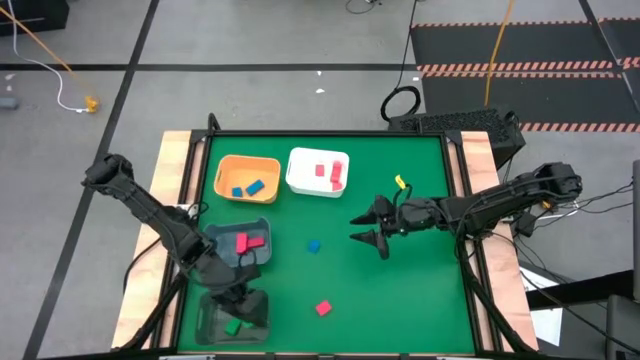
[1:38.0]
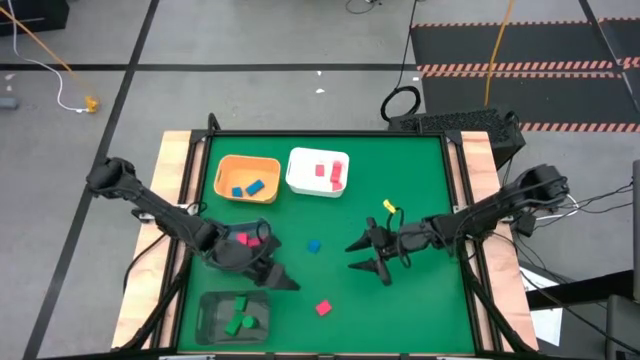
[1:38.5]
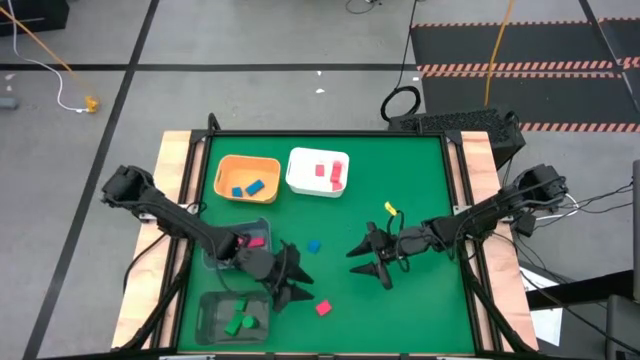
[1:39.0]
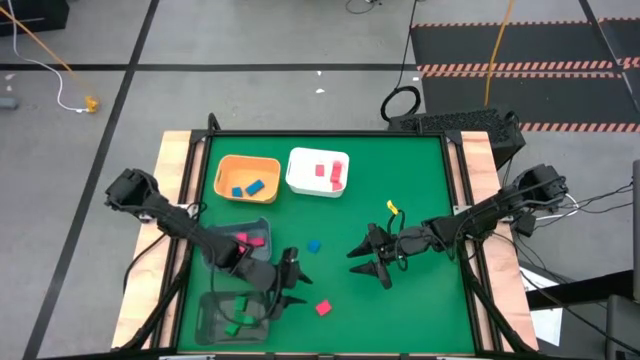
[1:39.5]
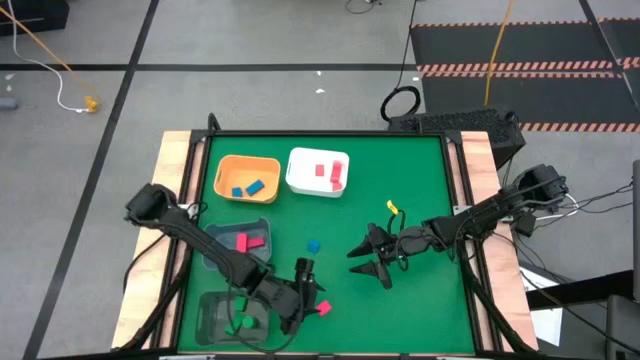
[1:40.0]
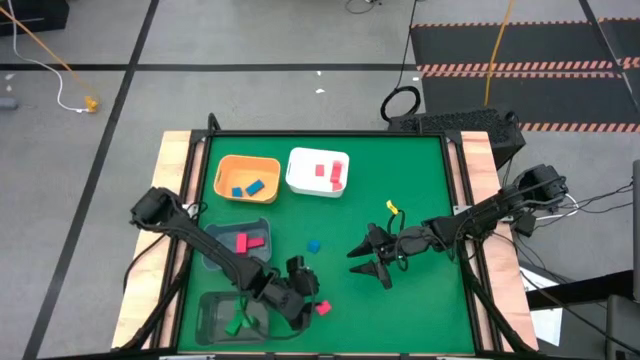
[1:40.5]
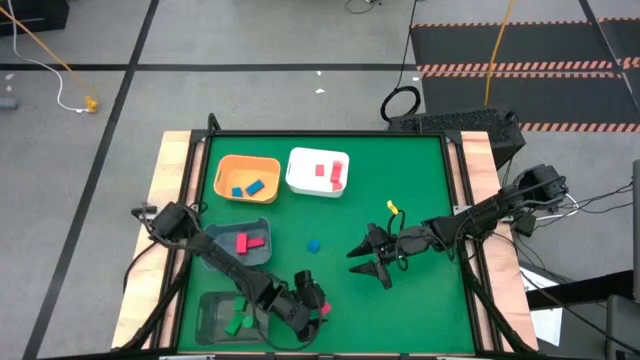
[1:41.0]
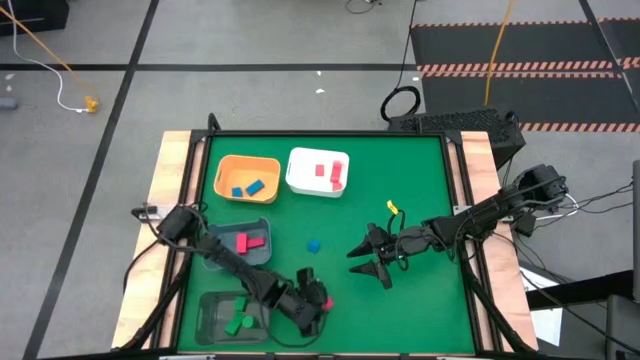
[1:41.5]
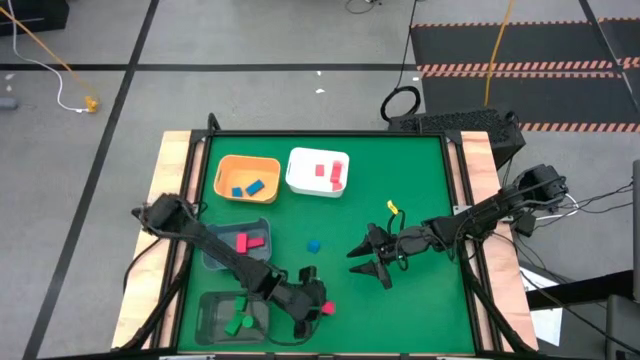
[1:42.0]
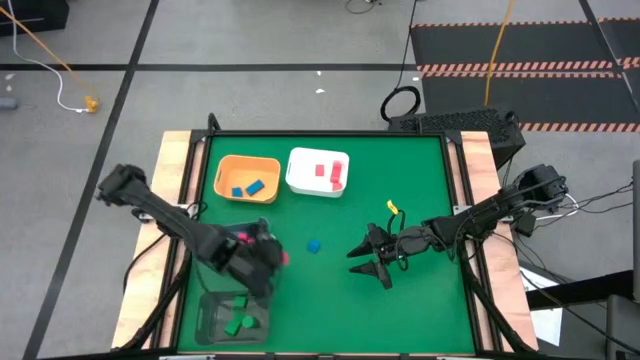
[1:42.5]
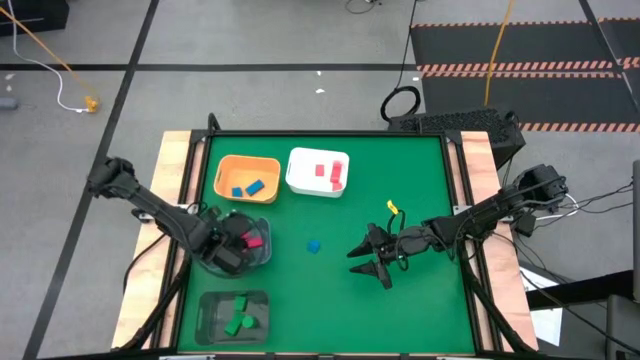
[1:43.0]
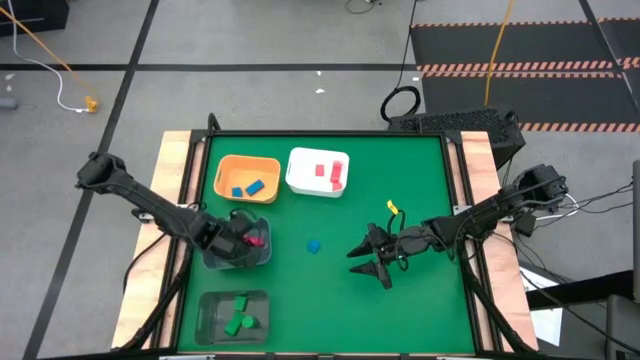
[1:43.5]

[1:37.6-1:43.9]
Task: Sort & place blocks by color
Put the red block into the grey bin

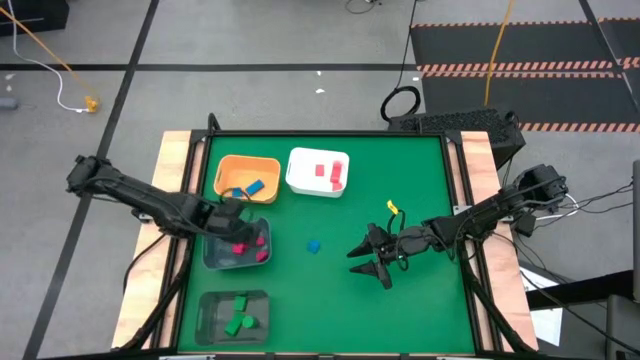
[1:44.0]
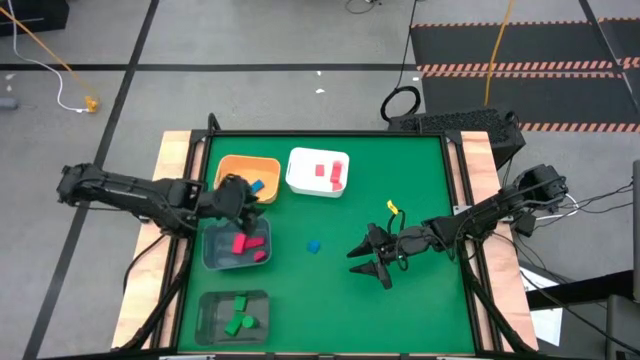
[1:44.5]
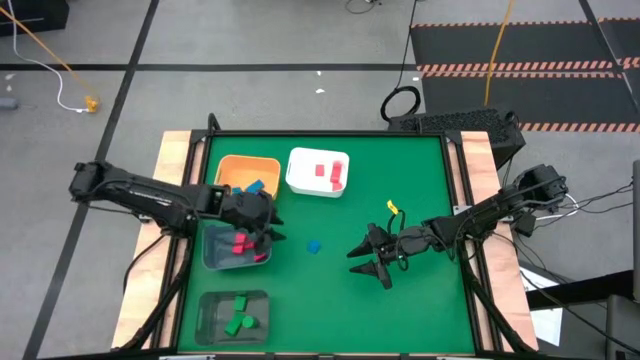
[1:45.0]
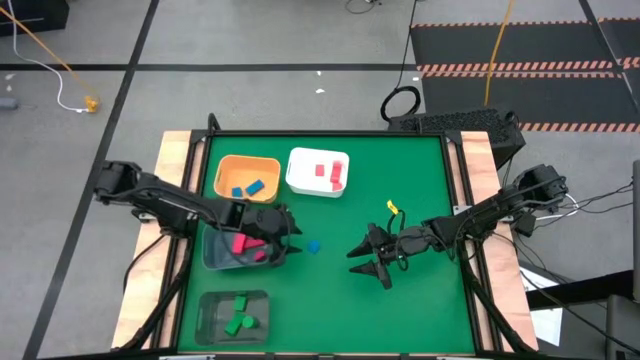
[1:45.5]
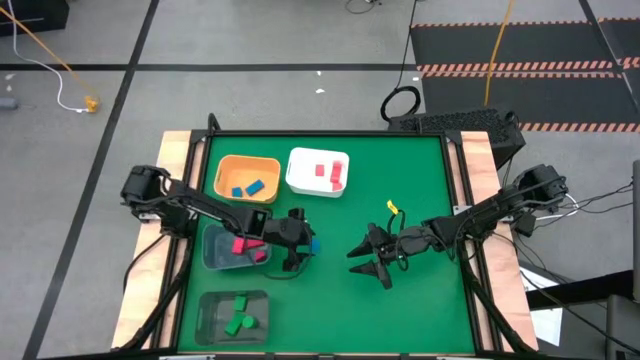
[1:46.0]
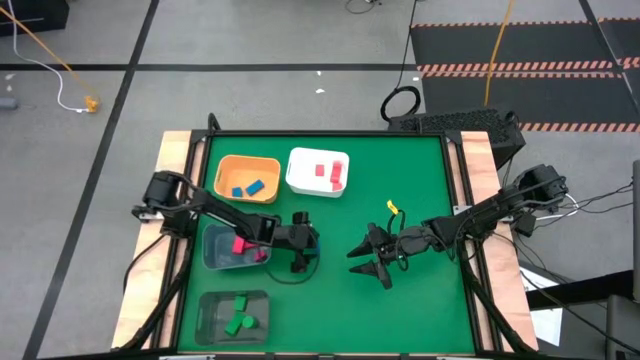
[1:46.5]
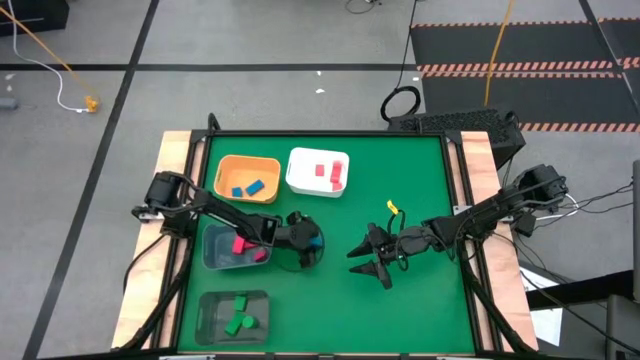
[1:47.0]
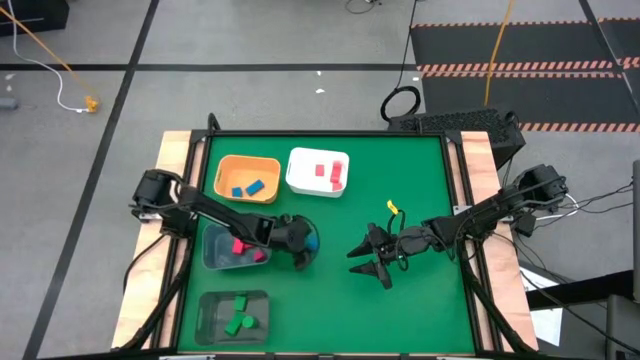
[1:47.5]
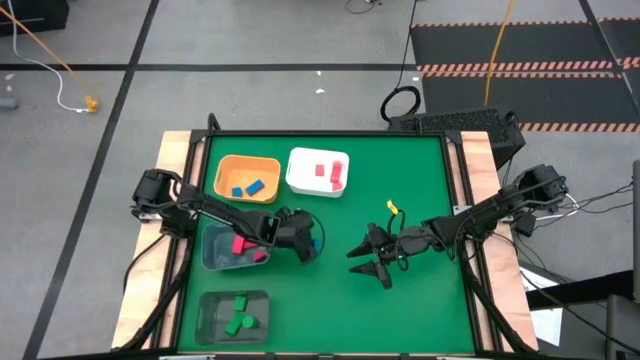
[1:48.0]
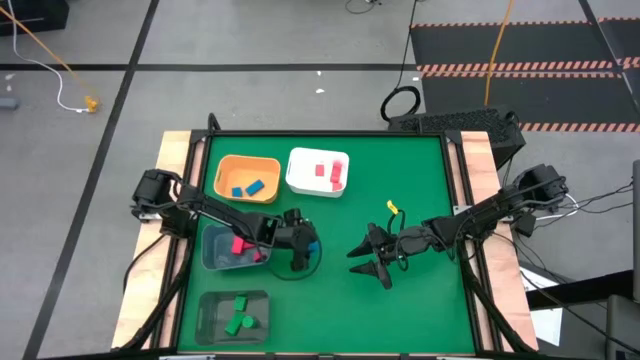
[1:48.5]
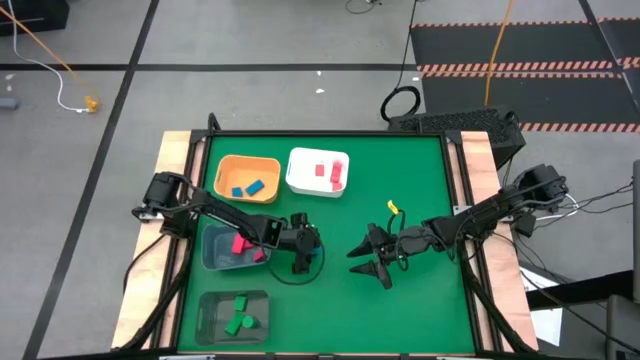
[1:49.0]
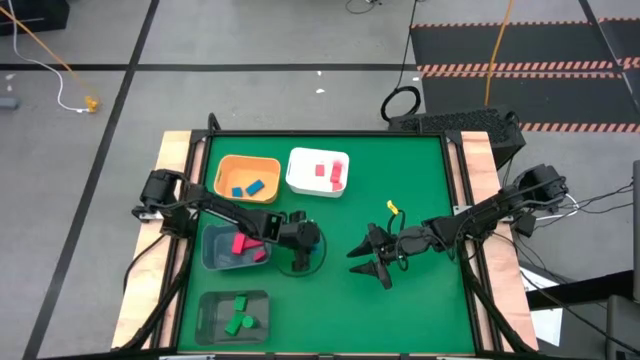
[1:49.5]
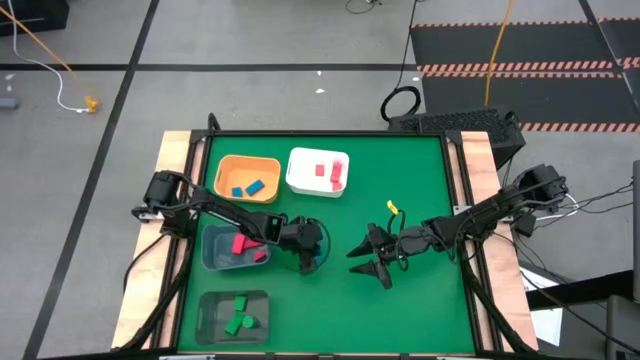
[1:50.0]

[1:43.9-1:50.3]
Put the blue block into the yellow bin

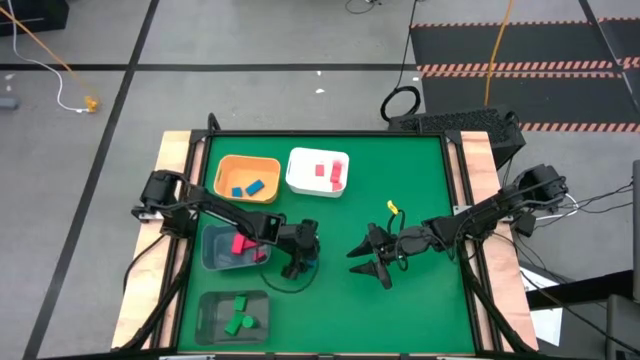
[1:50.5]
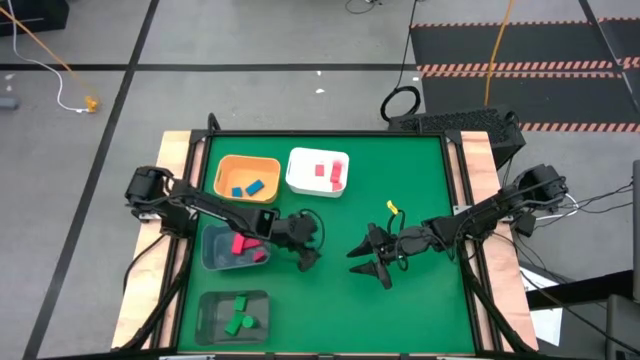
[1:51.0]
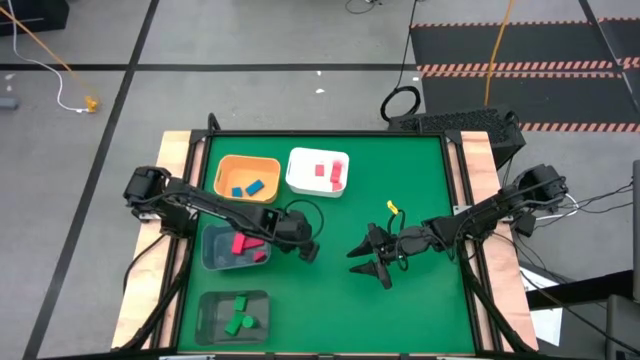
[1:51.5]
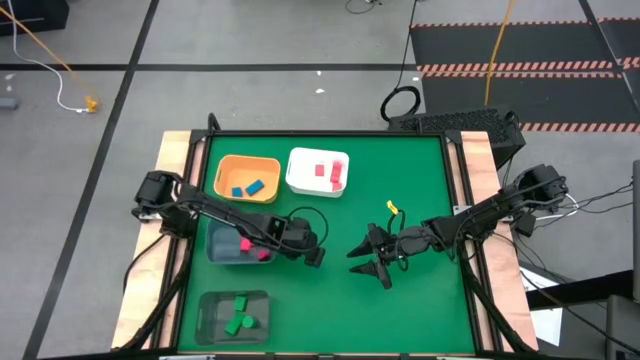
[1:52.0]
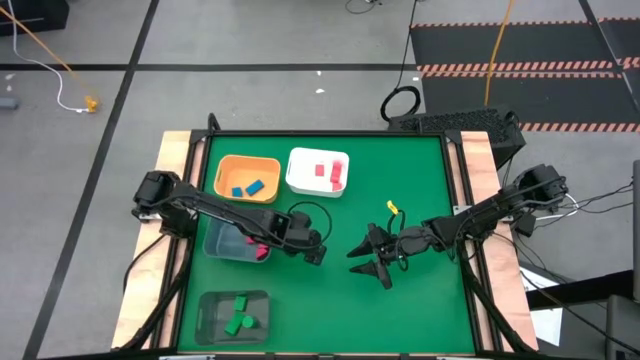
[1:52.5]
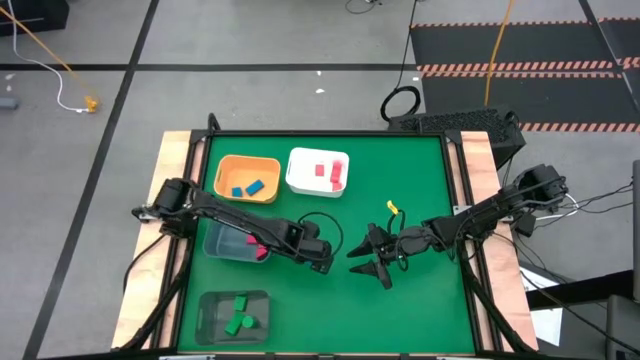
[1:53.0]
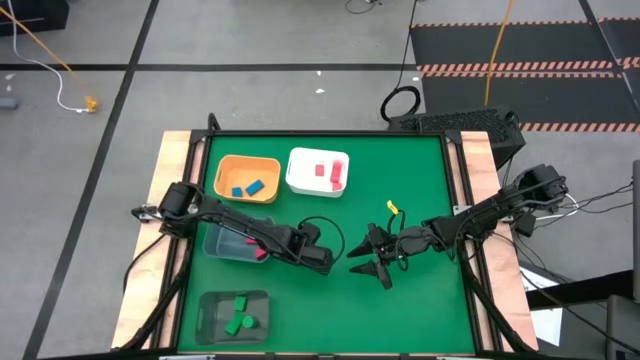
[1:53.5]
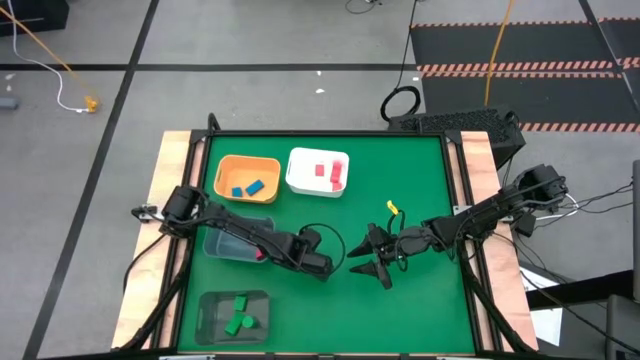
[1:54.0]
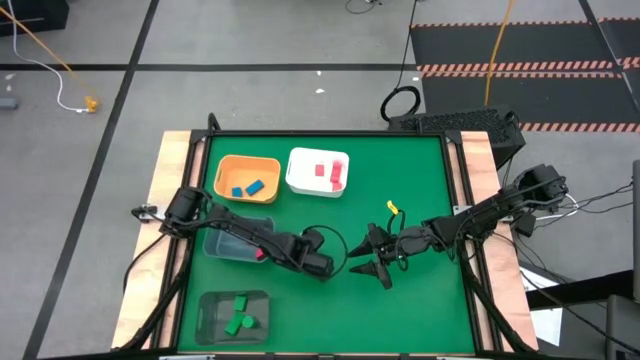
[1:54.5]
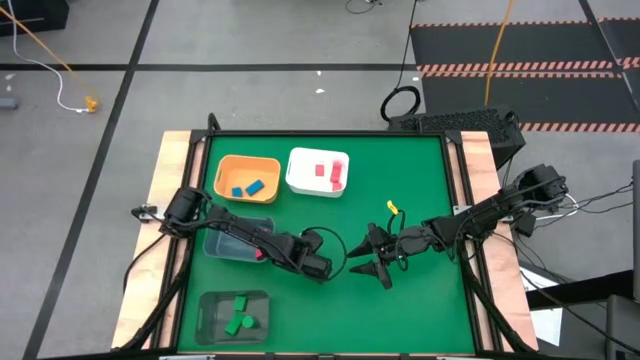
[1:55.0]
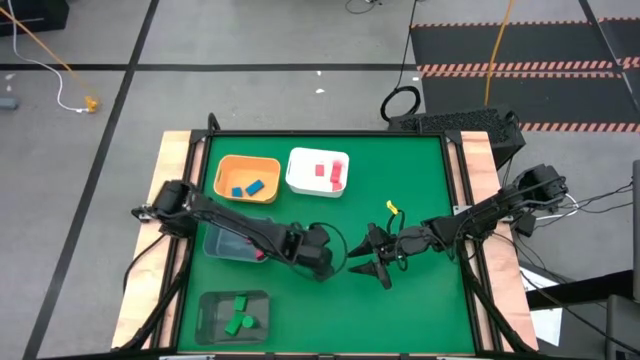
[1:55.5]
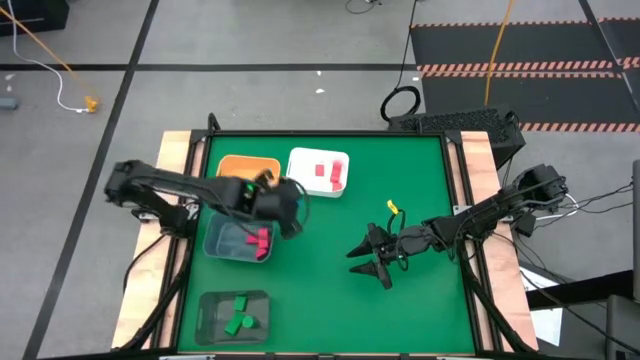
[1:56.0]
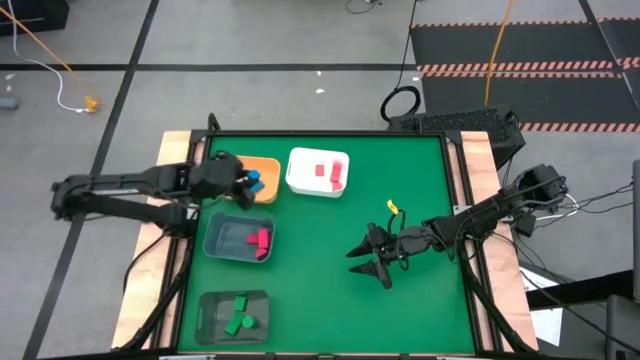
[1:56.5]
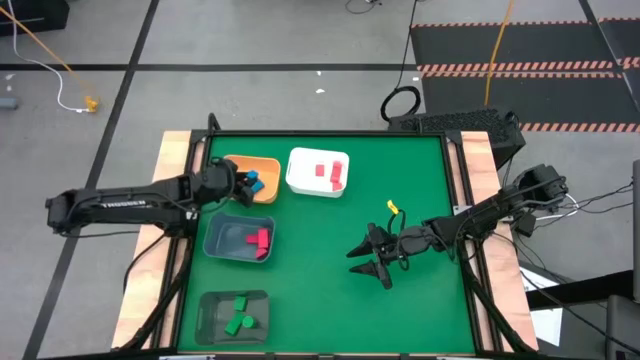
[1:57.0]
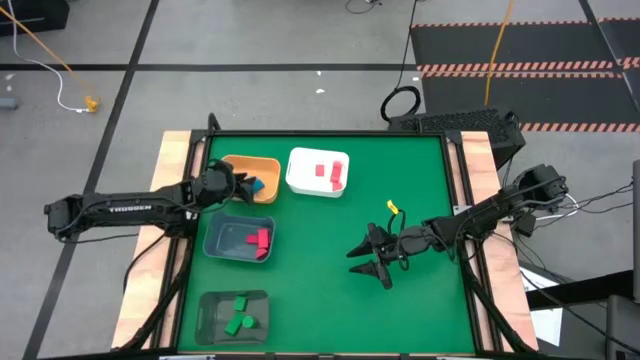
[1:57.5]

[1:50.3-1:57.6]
Put the blue block into the yellow bin

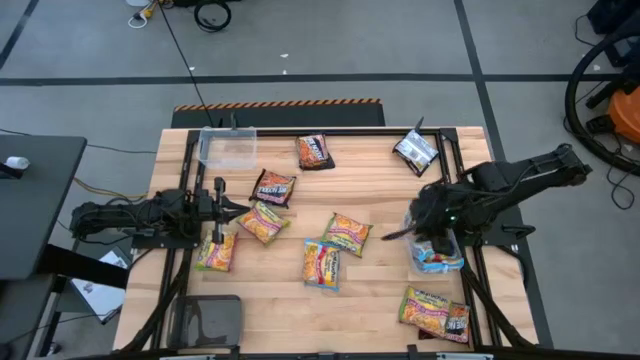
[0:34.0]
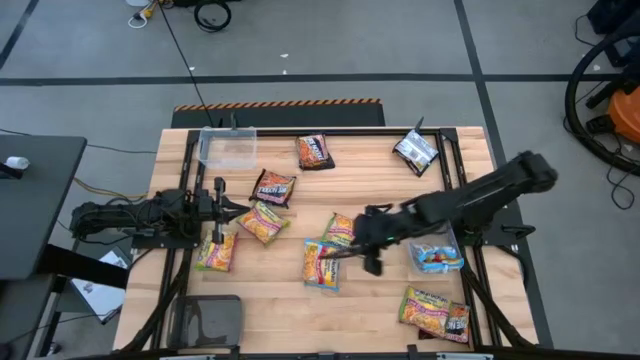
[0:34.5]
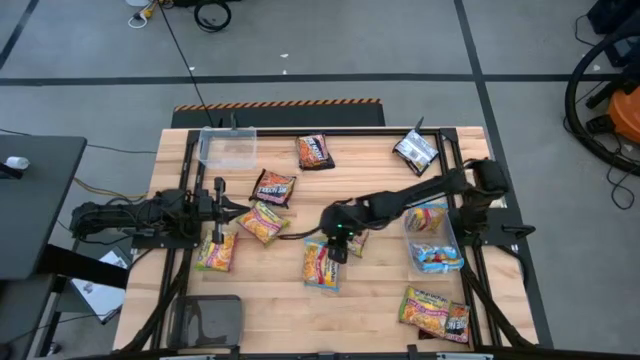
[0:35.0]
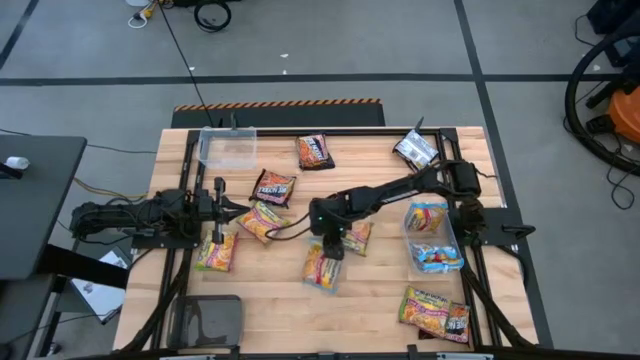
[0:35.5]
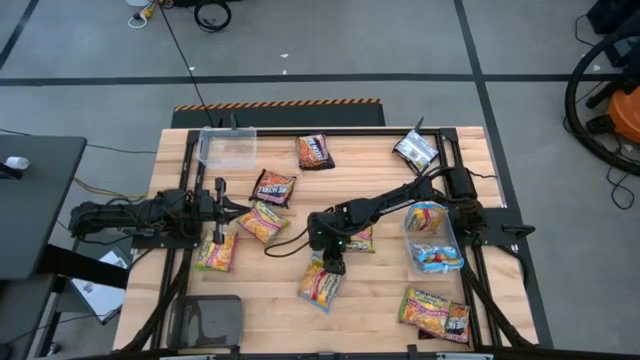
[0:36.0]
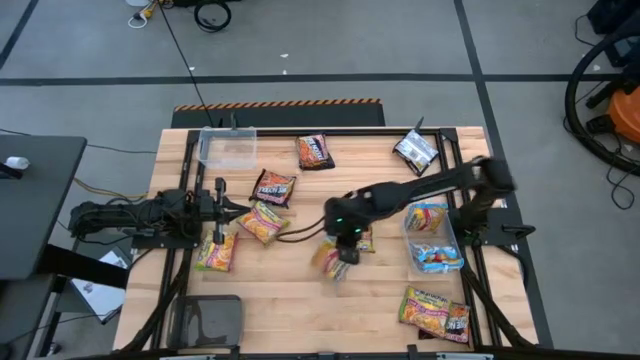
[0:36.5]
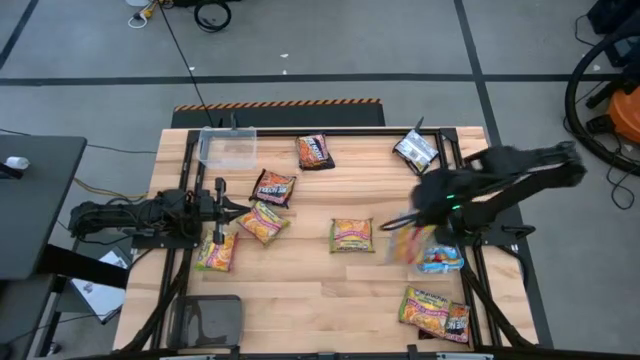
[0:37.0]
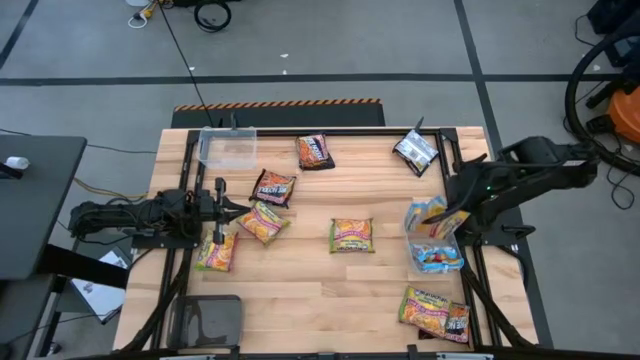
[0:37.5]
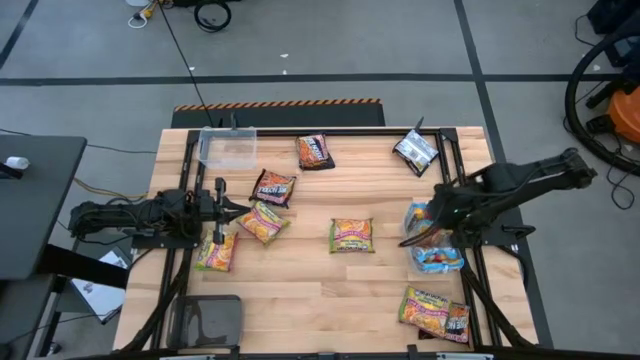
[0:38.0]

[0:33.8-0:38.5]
Task: Sort Maruchan noodles
Put the blue noodle pack into the bottom transparent bin
